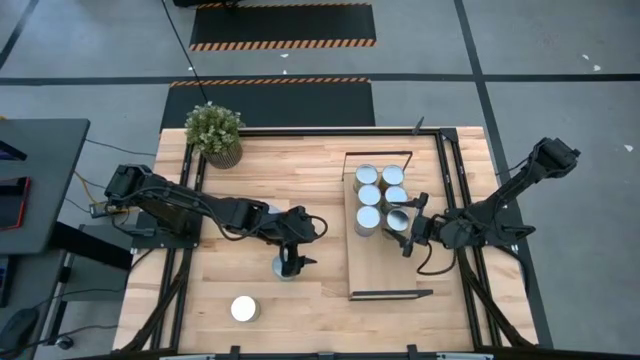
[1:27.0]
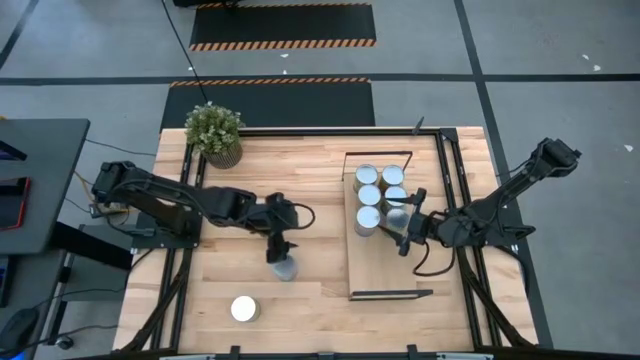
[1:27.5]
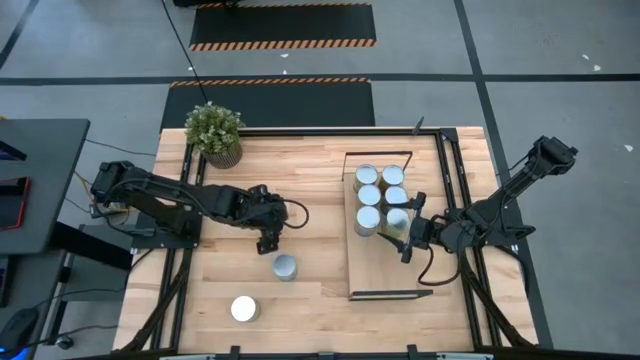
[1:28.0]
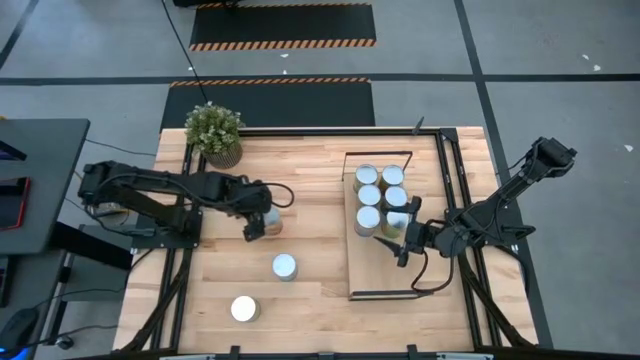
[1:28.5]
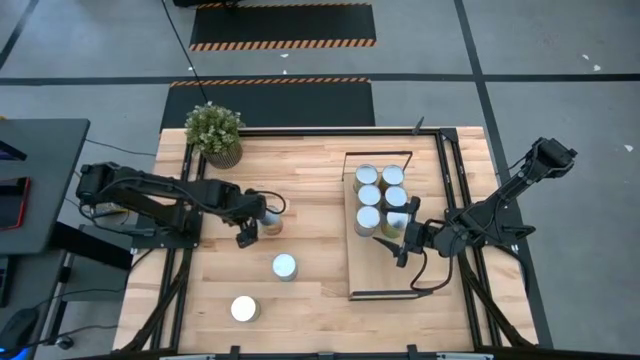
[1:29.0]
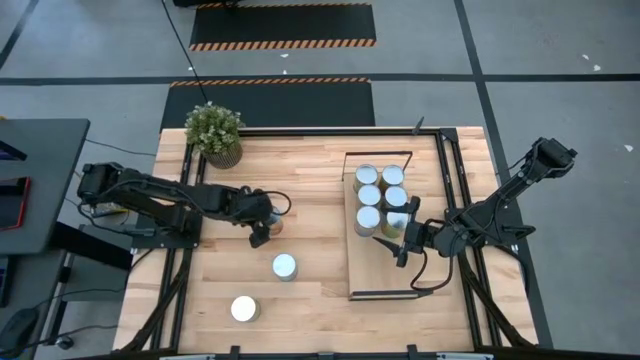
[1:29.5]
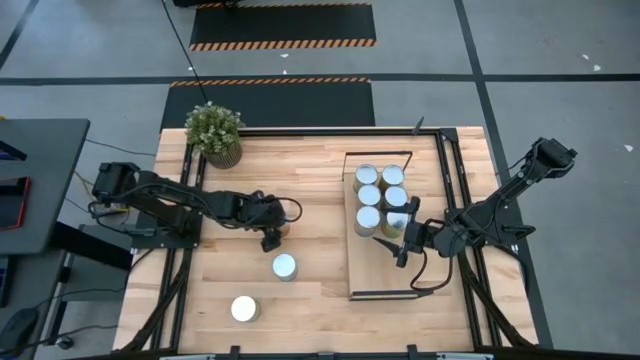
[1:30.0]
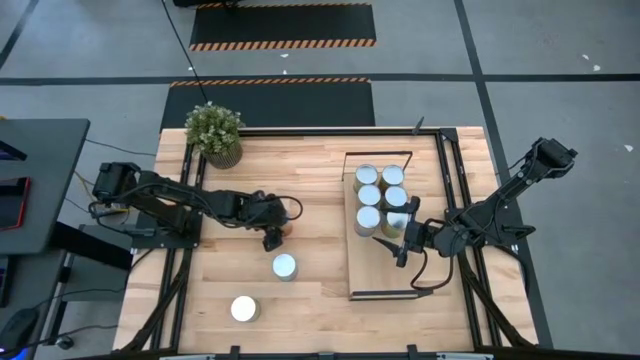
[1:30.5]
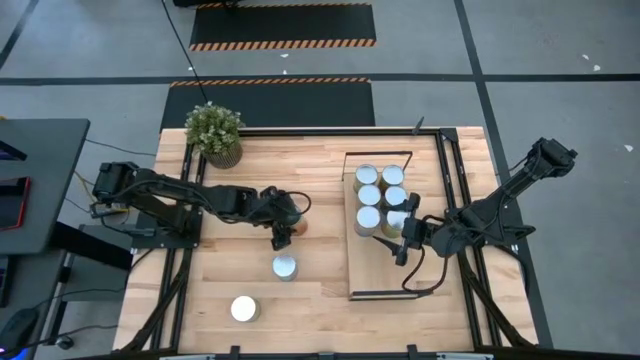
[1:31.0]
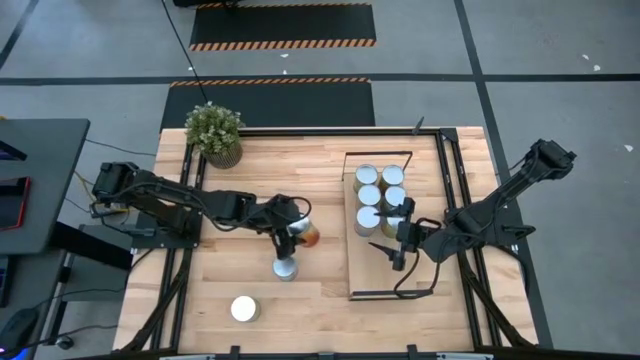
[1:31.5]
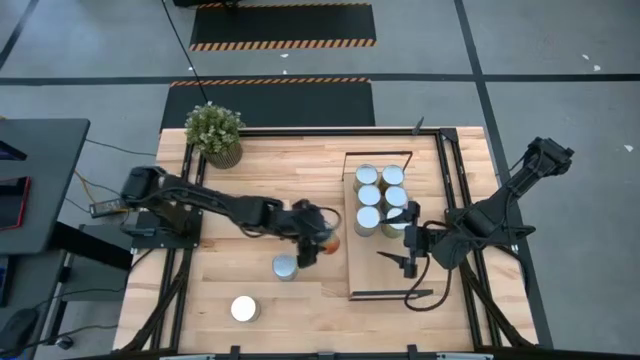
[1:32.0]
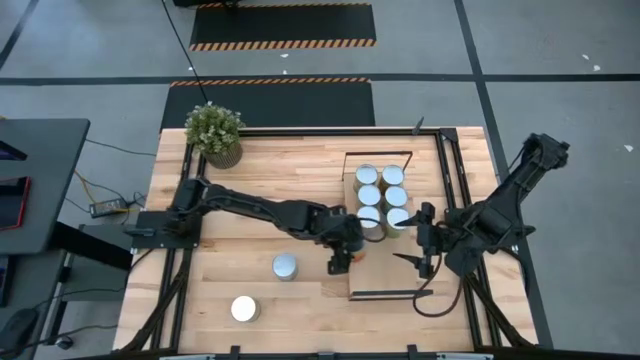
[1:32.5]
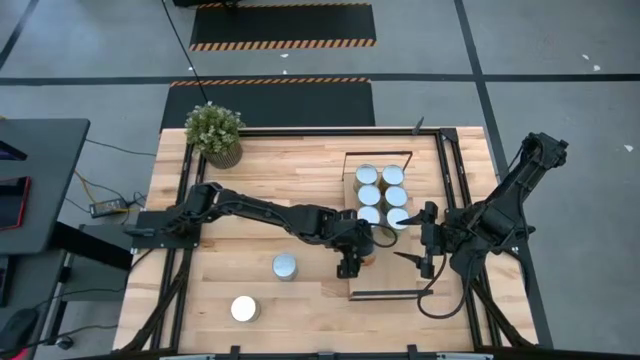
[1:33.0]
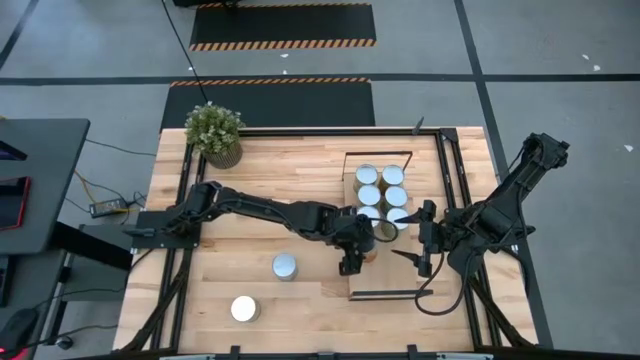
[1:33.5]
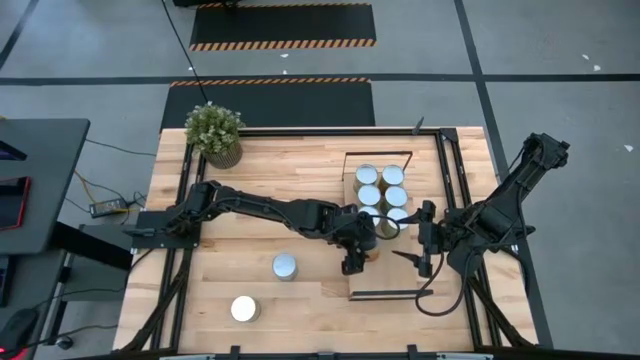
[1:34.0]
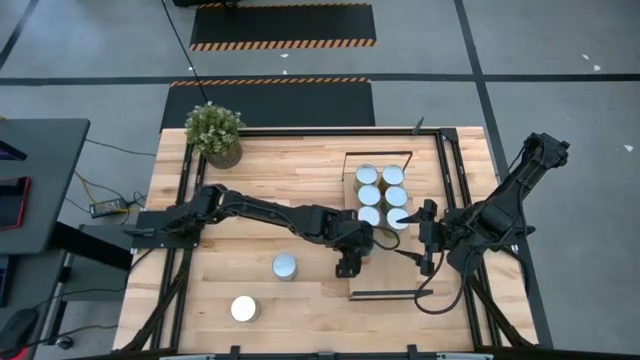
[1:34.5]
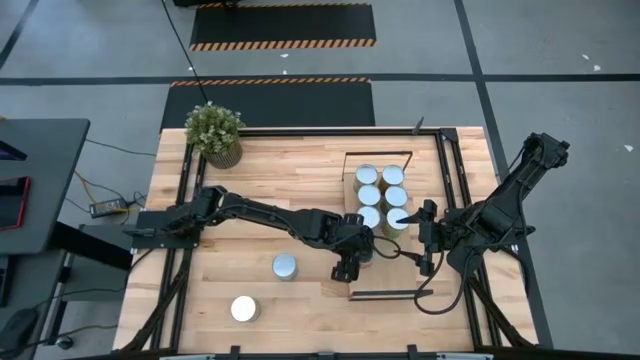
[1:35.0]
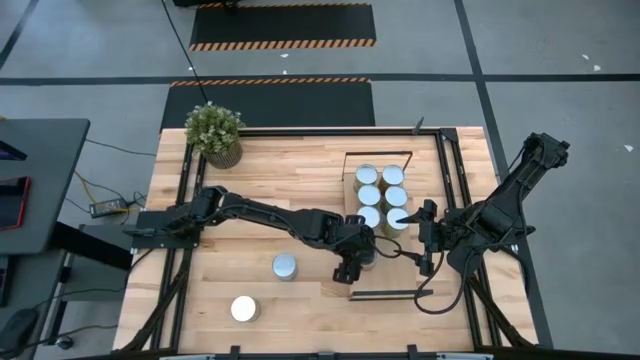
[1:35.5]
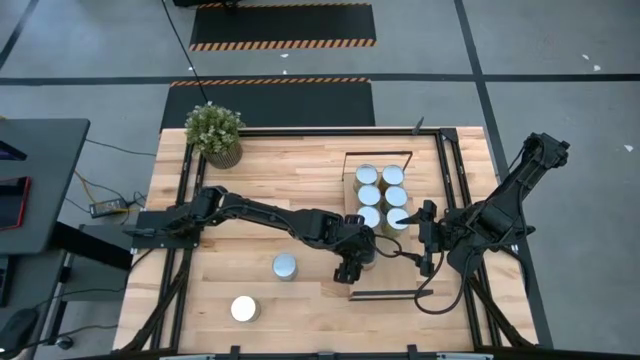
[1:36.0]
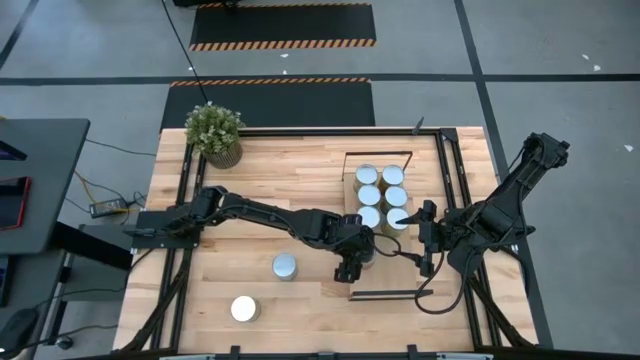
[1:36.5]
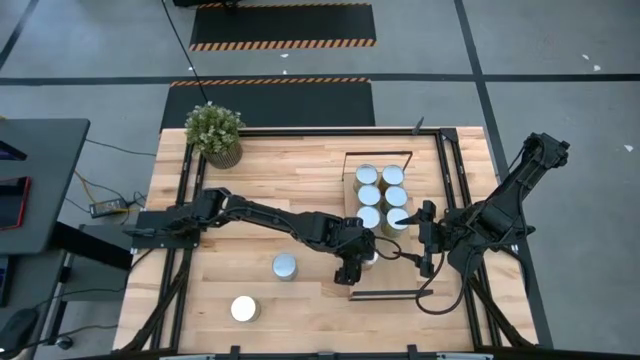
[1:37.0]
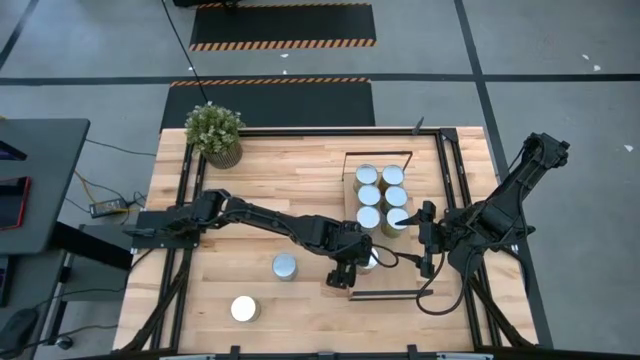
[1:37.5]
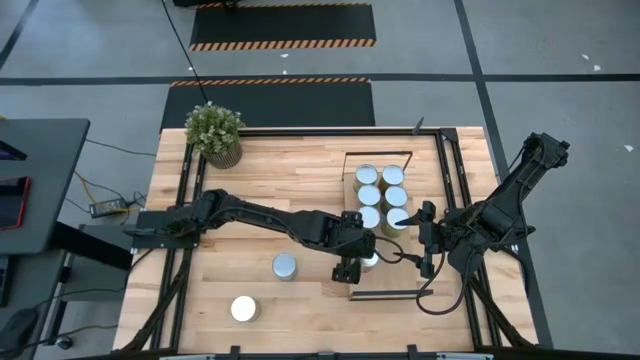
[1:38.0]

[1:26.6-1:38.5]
Task: Pick and place cans onto a shelf
Put the canned corn on the shelf

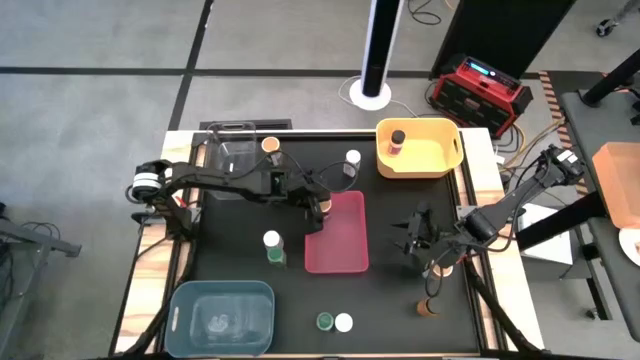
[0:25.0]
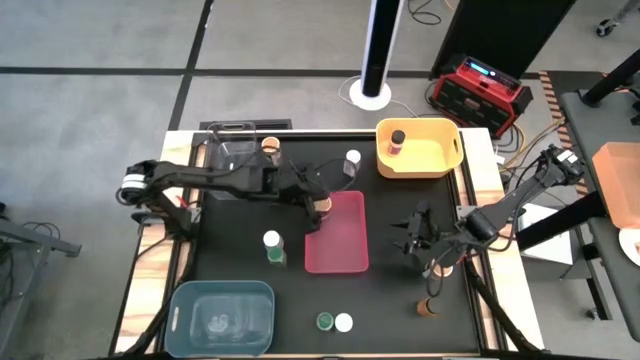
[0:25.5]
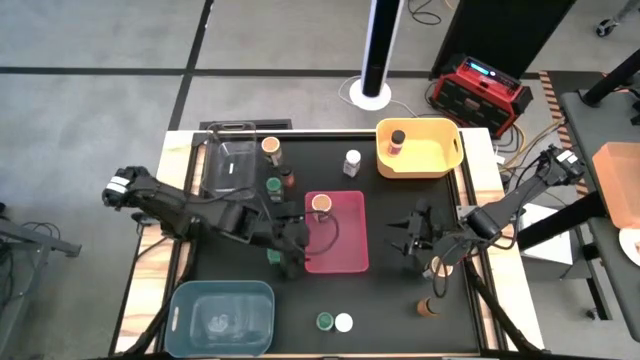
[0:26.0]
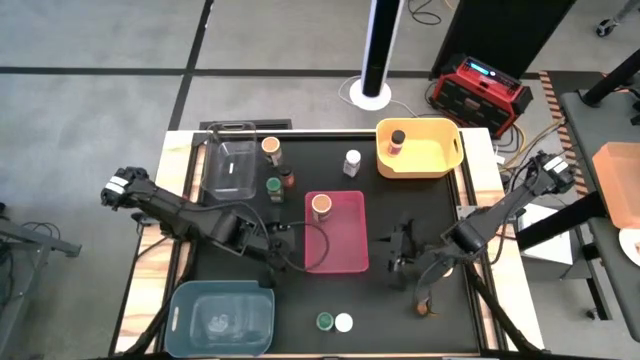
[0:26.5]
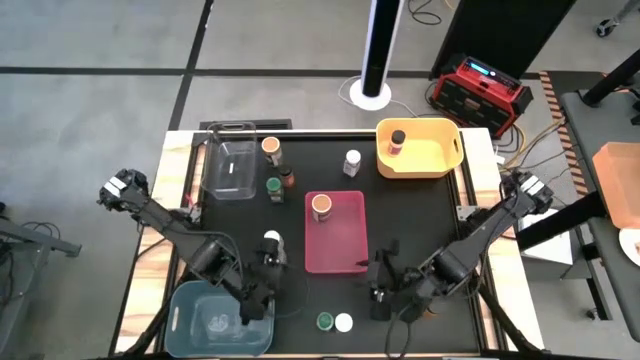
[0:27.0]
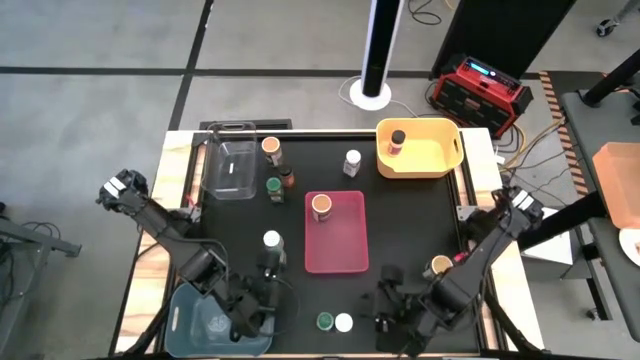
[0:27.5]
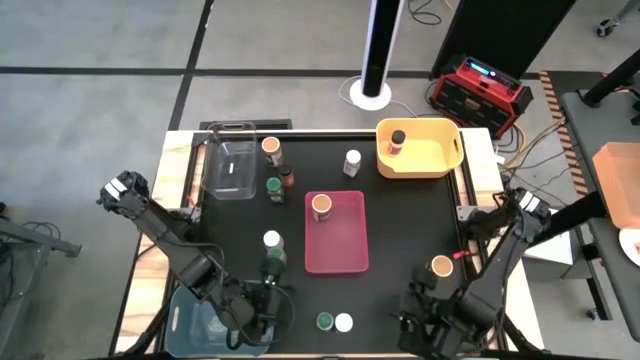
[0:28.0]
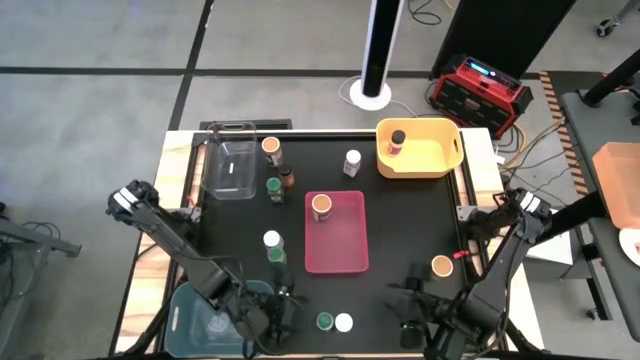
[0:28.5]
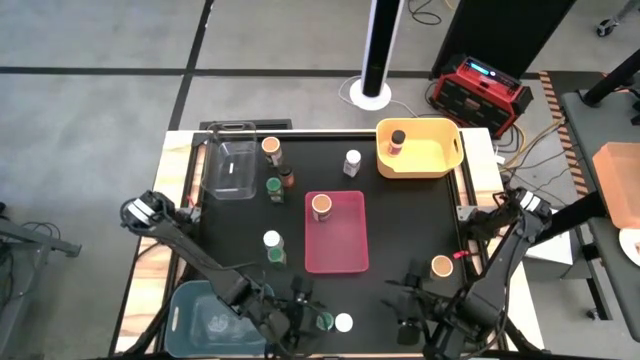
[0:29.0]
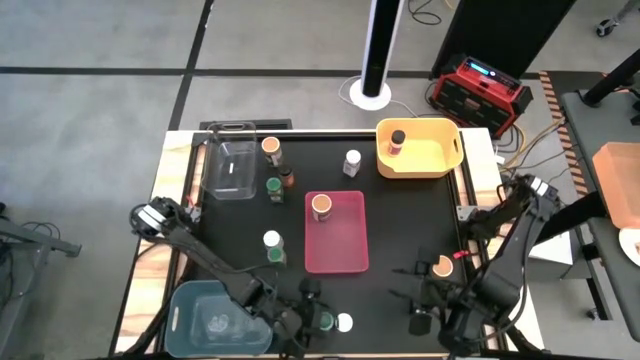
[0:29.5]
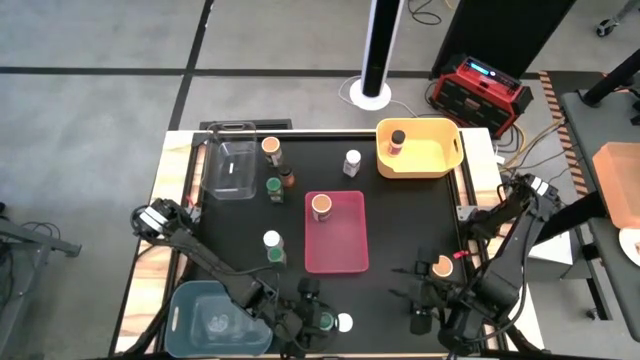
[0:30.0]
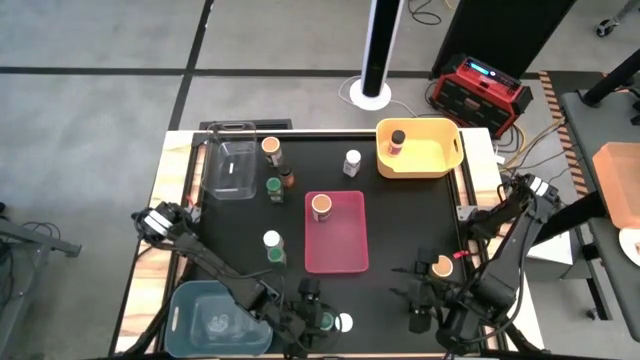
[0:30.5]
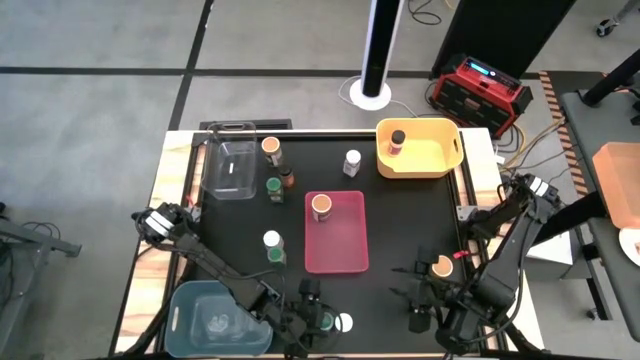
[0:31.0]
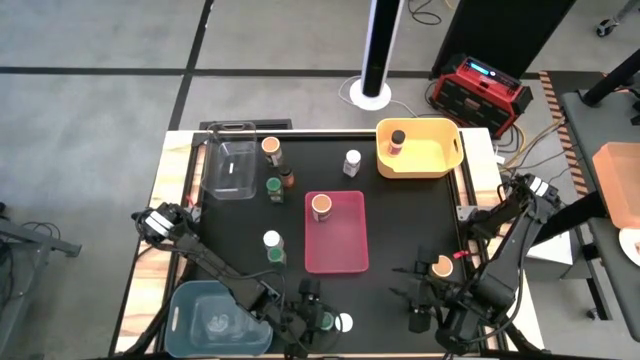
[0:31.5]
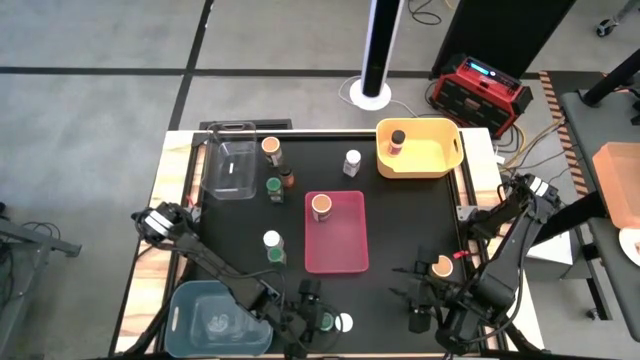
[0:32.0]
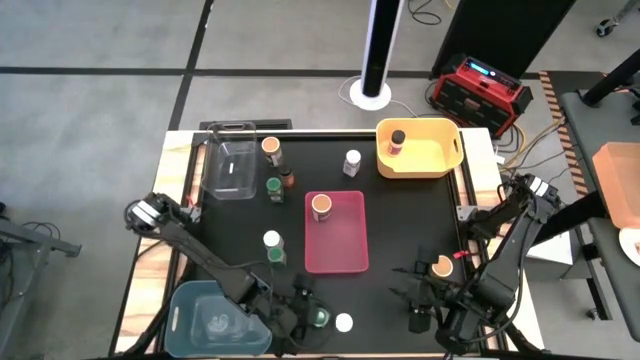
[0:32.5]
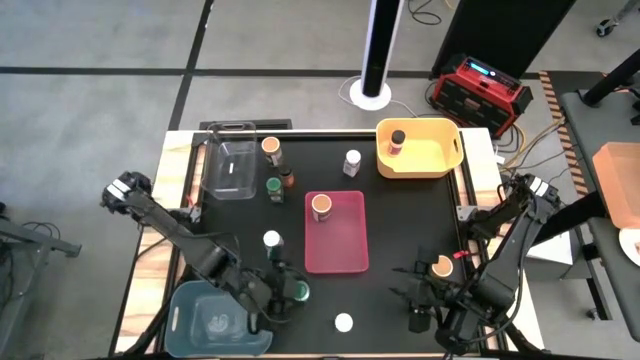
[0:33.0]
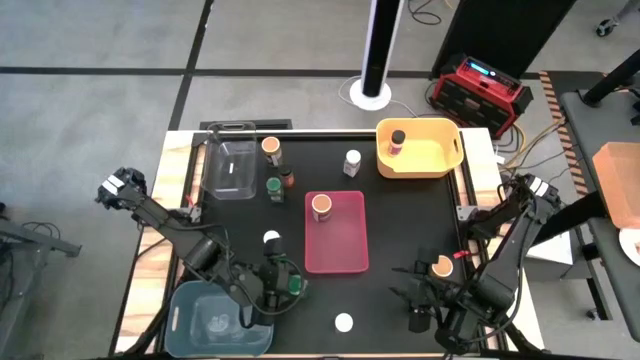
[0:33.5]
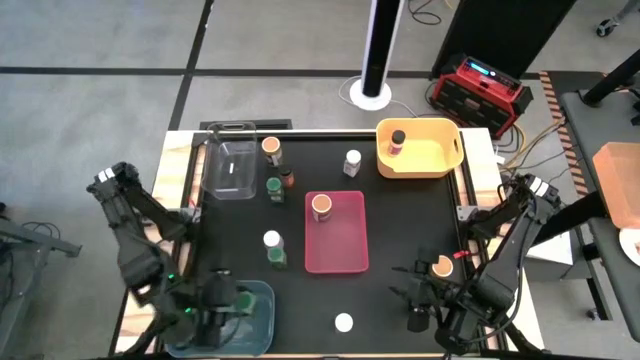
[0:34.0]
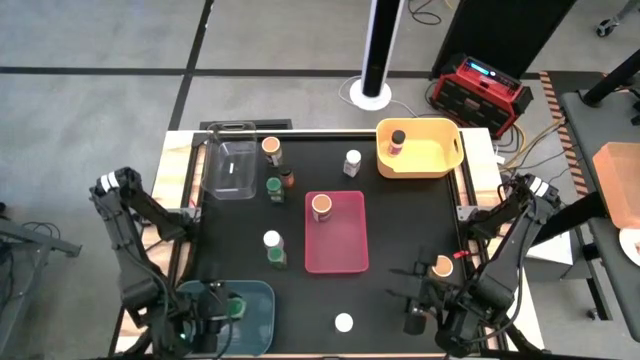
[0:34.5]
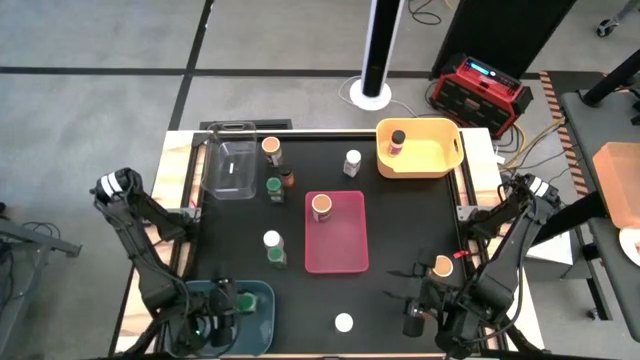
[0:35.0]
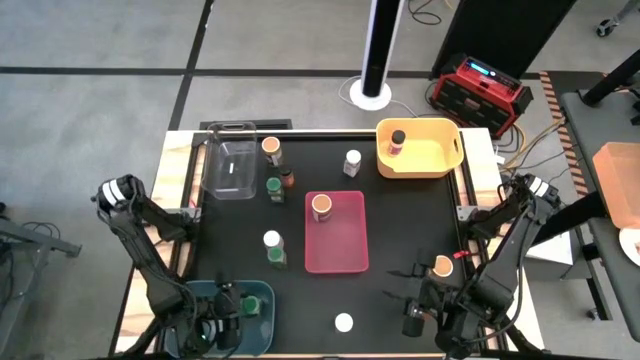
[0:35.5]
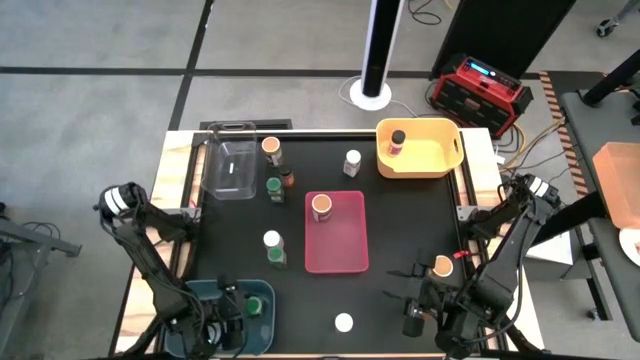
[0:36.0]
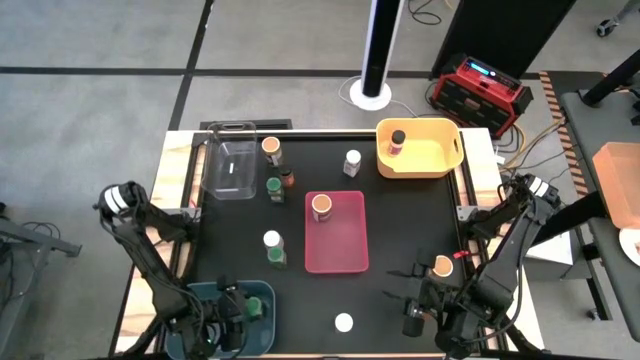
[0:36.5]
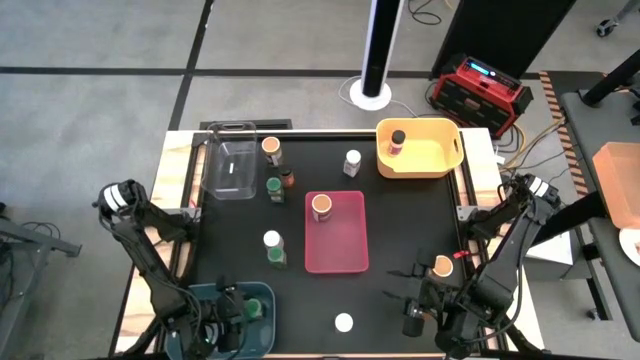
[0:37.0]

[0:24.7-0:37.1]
Task: Sort spices by type
Put the bottom green seasoning bottle into the blue bin
